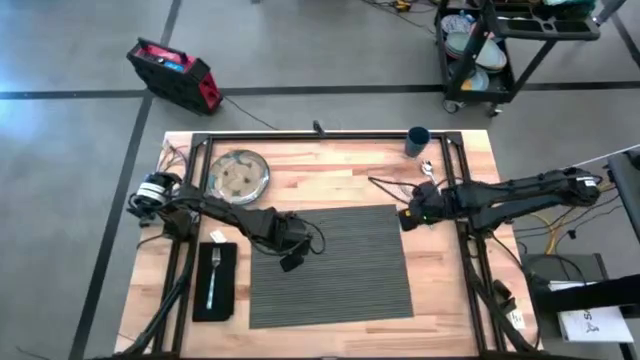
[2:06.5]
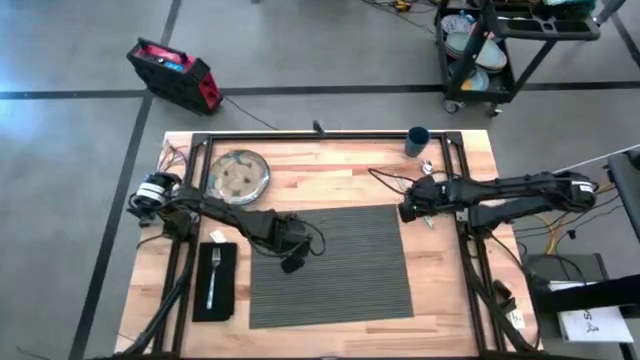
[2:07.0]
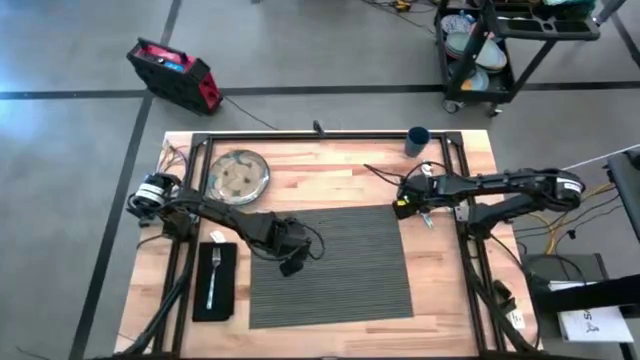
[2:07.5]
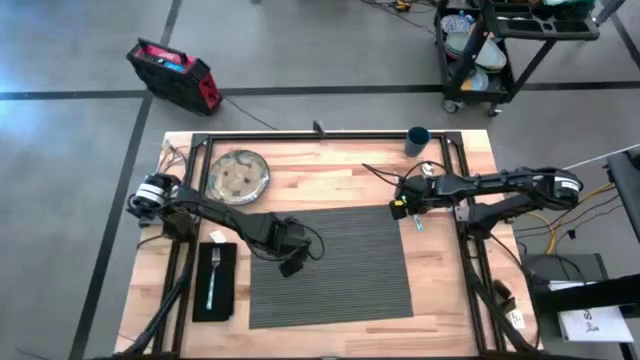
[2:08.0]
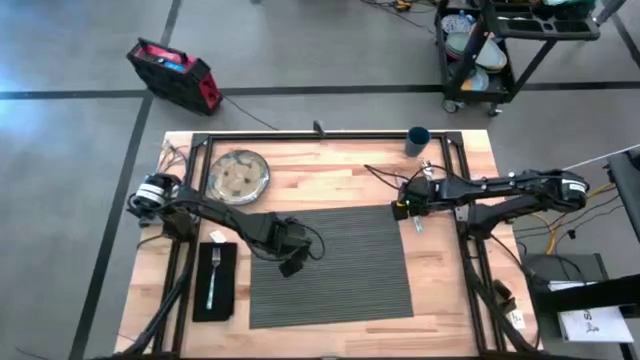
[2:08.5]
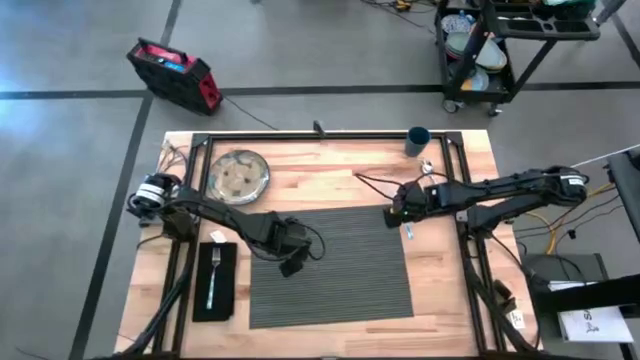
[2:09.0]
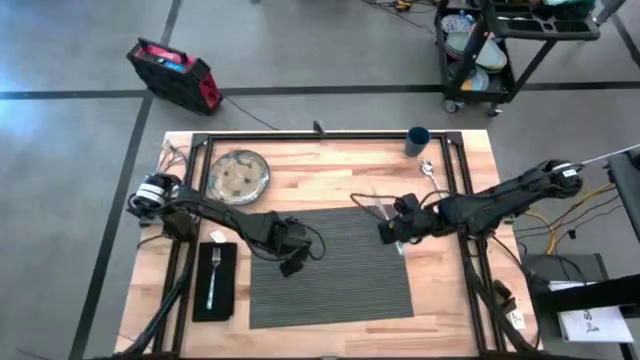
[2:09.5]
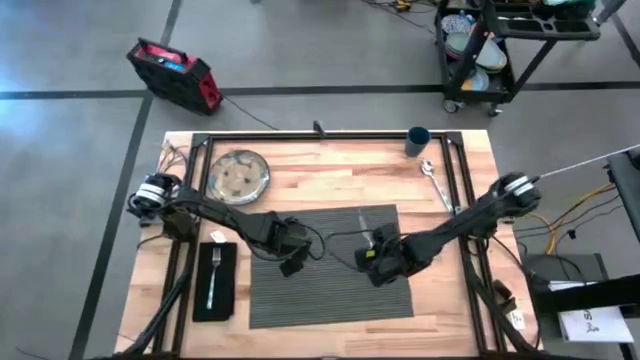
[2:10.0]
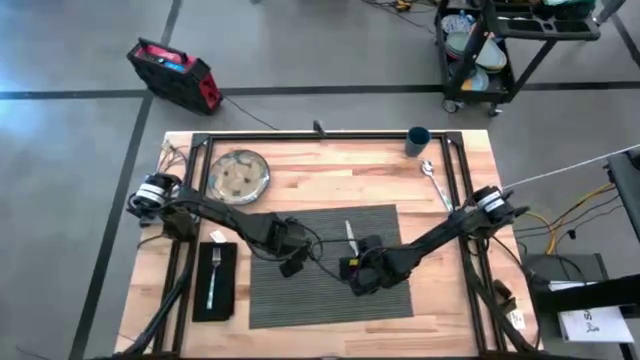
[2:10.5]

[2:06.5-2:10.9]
Task: Set table place
Put the white and blue patterned knife on the dark blue table mat

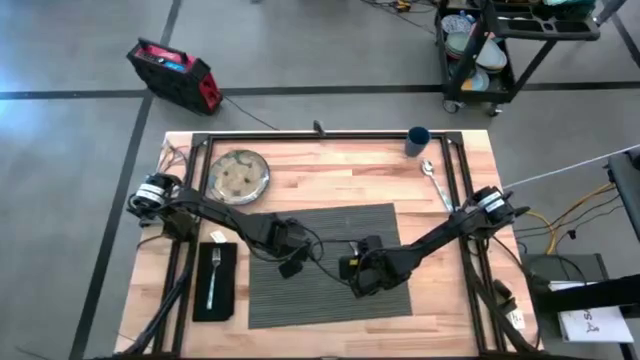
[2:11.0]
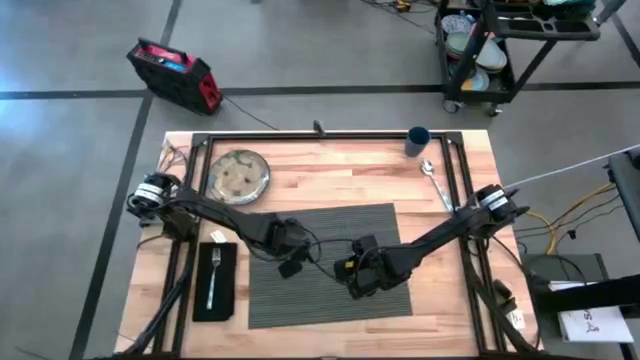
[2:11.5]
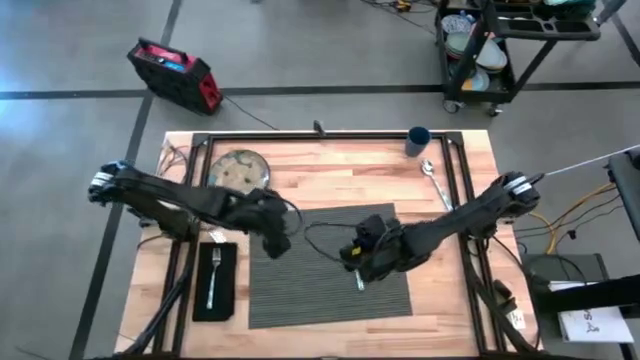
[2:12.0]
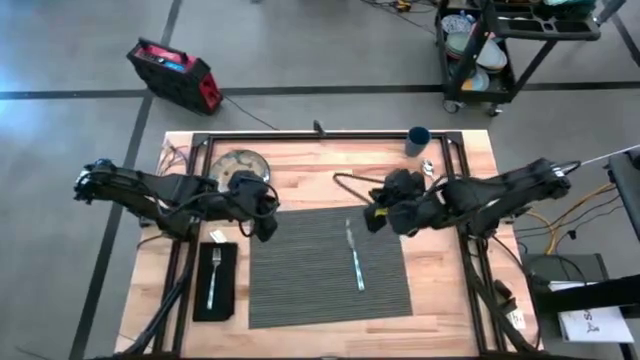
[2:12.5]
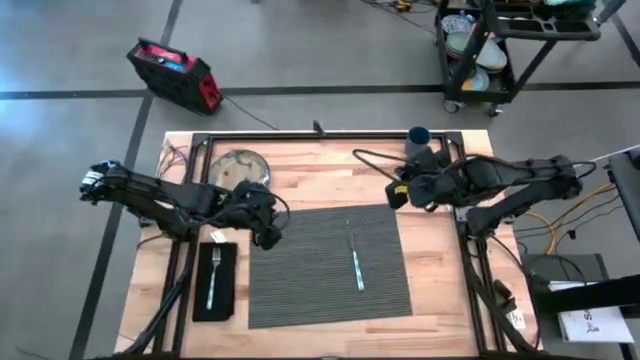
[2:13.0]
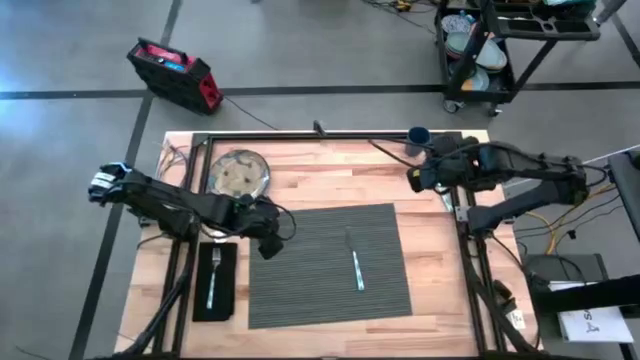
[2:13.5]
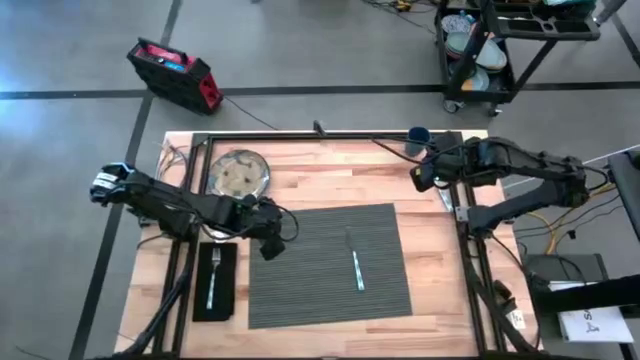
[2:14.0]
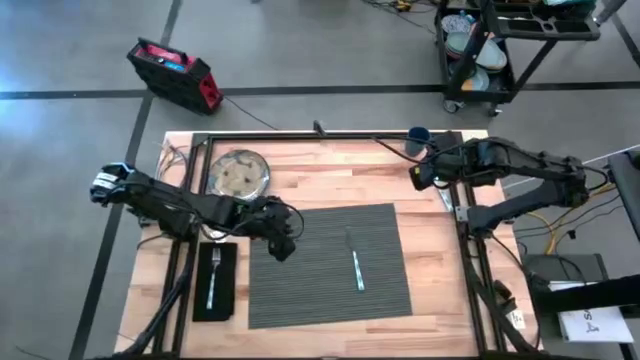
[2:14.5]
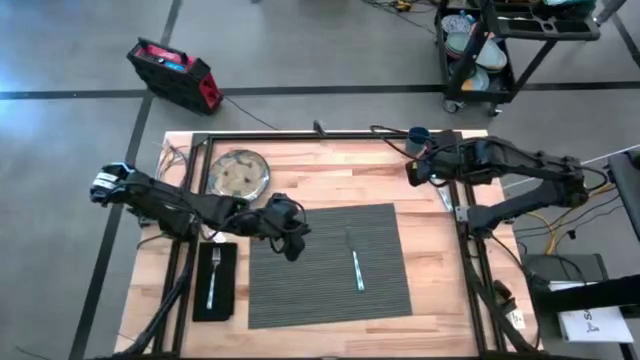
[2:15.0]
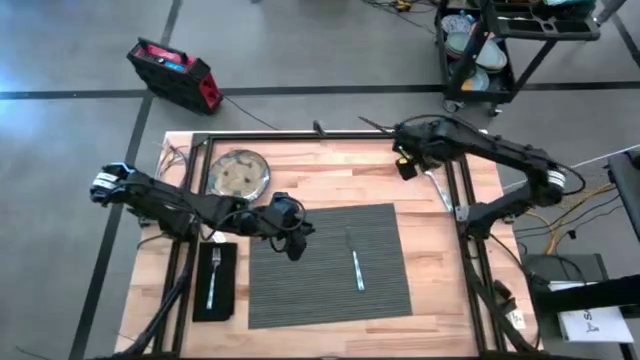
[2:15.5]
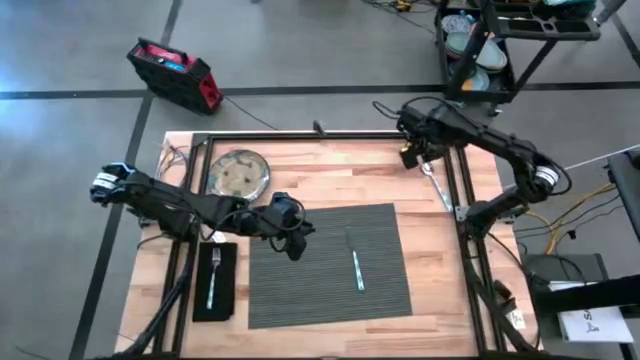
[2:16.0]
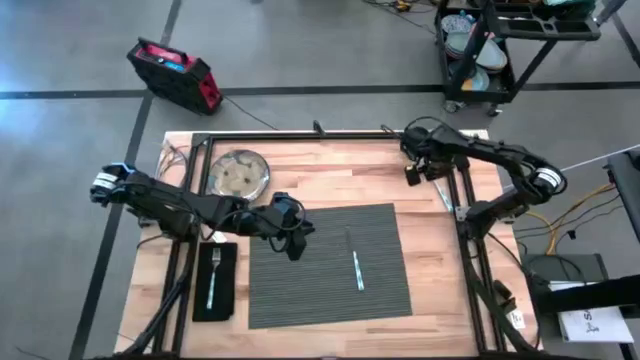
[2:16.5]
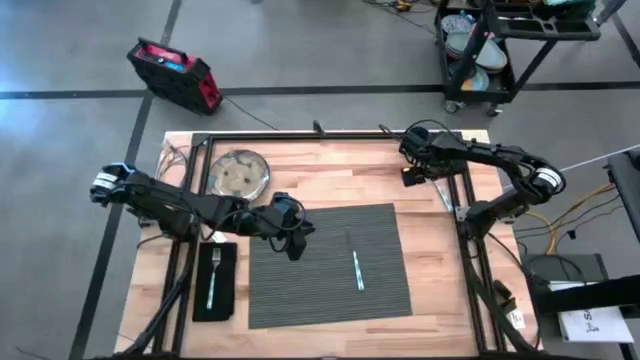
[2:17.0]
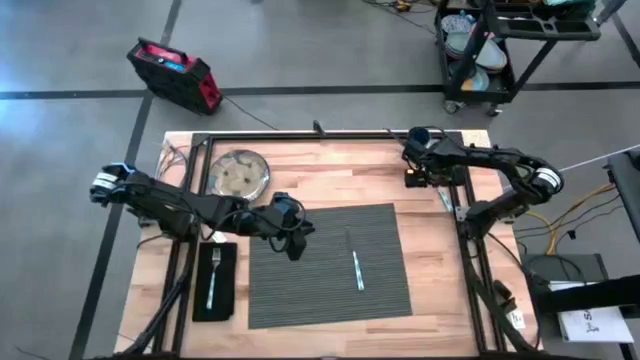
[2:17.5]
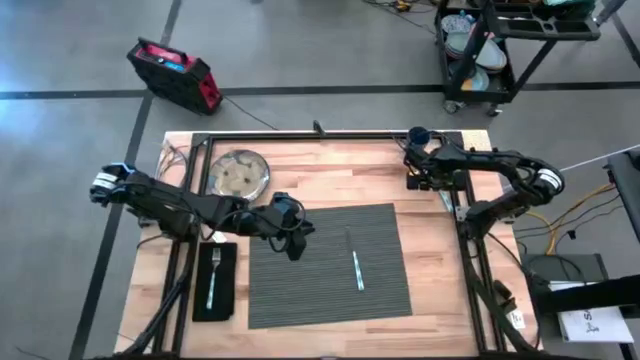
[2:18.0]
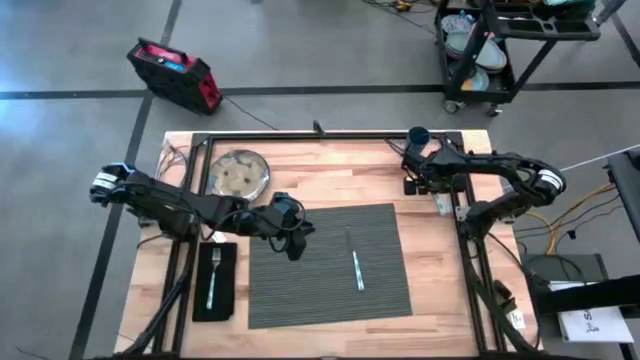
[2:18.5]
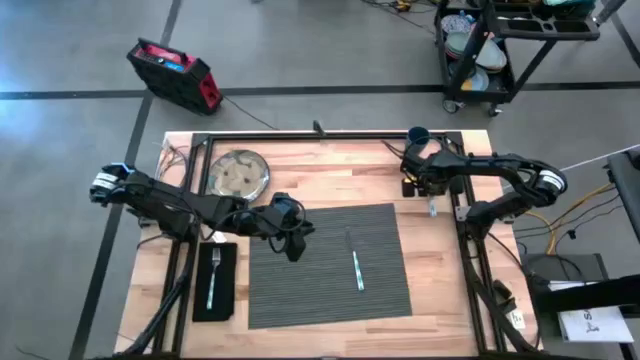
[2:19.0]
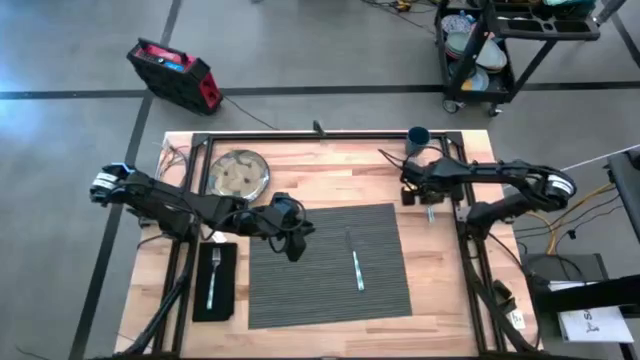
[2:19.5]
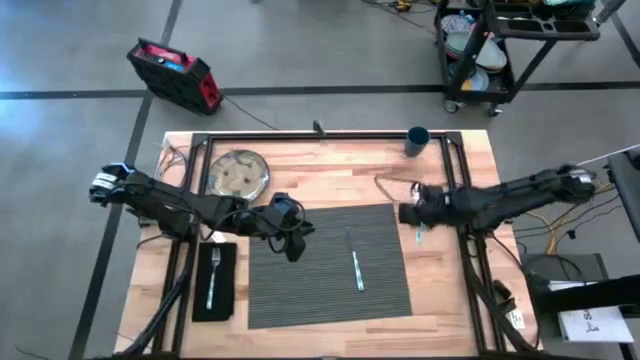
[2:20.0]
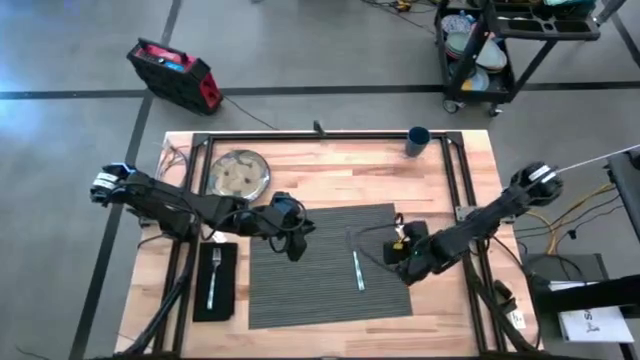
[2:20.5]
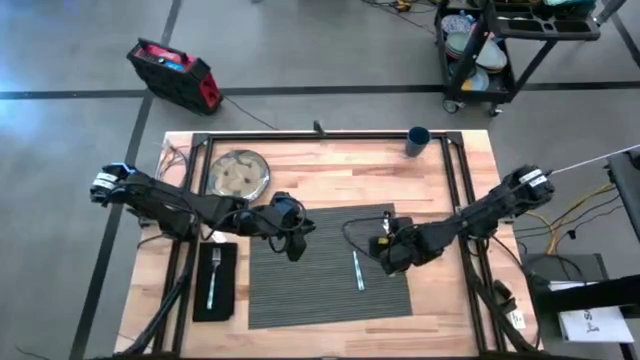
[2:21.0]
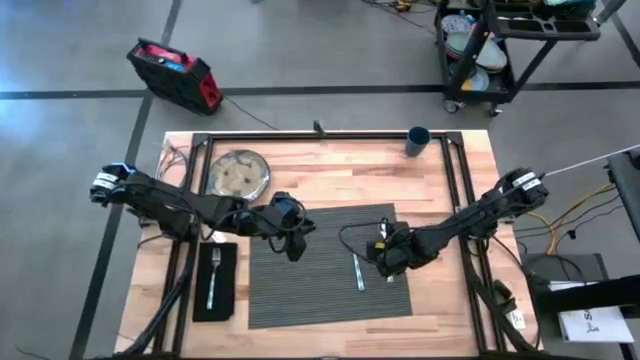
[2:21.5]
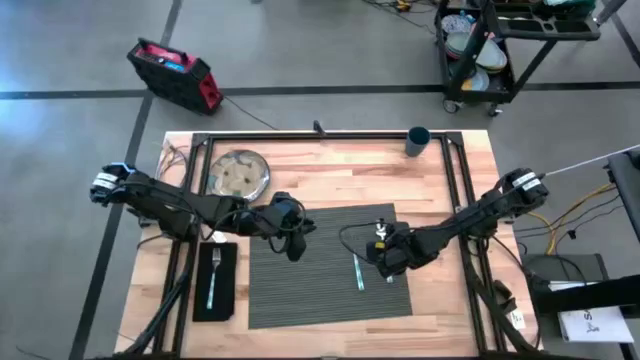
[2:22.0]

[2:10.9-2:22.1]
Put the white and blue patterned spoon on the dark blue table mat

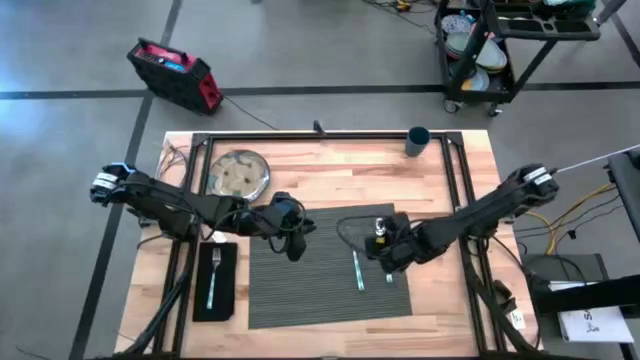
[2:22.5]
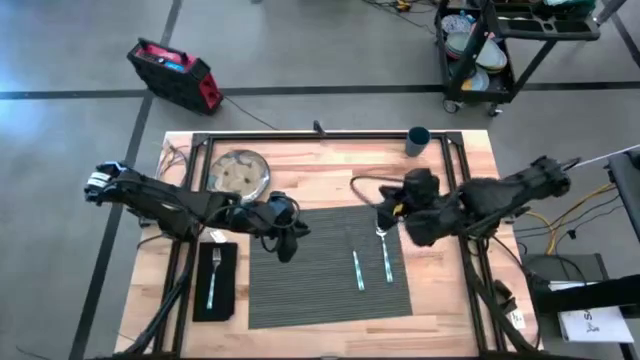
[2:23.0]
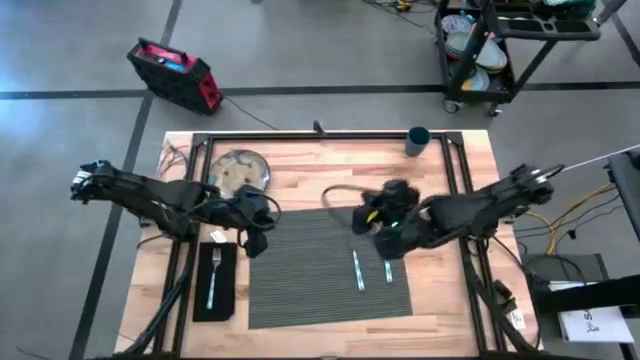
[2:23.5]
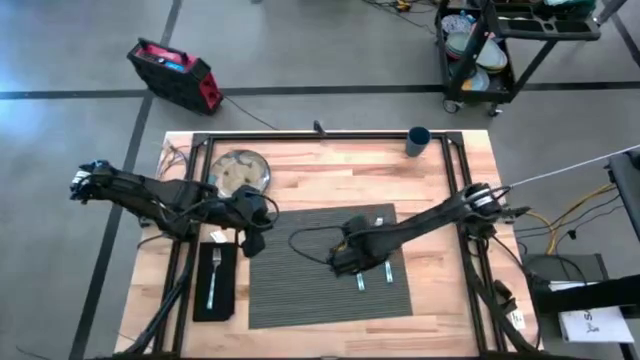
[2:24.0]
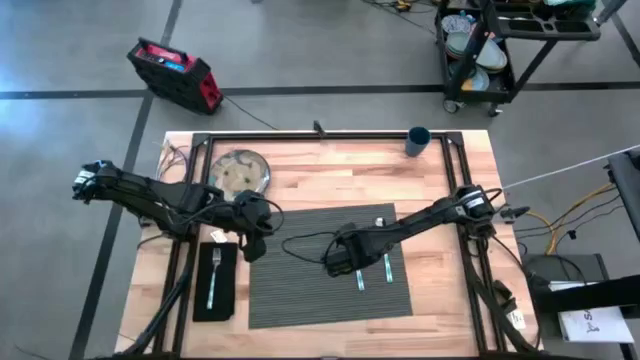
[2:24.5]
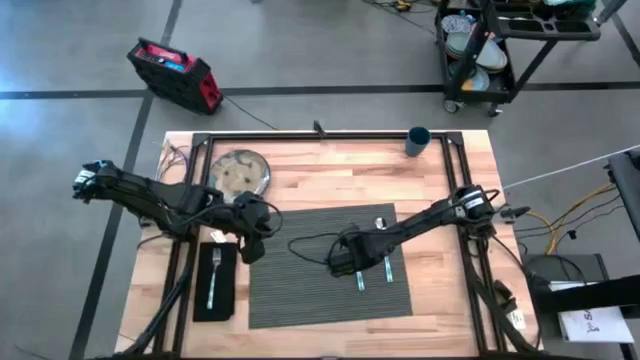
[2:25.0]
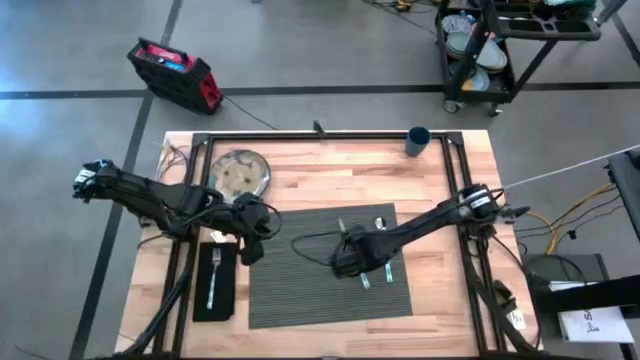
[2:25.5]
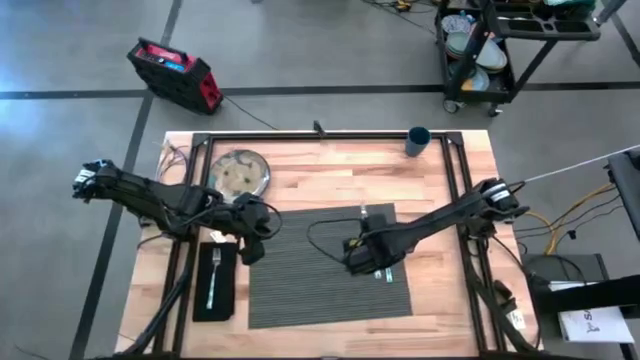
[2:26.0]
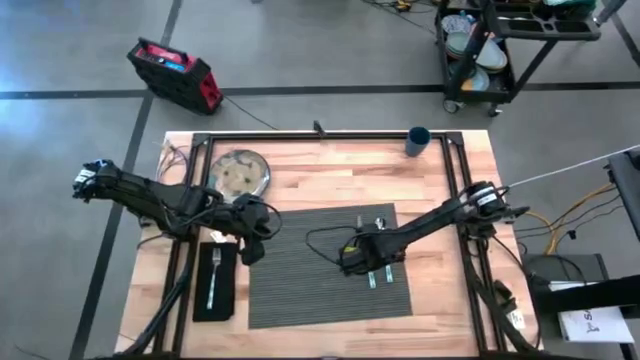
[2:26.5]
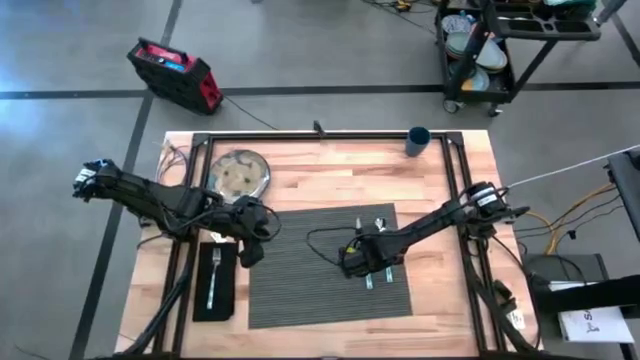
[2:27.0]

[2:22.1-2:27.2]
Adjust the white and blue patterned knife on the dark blue table mat
